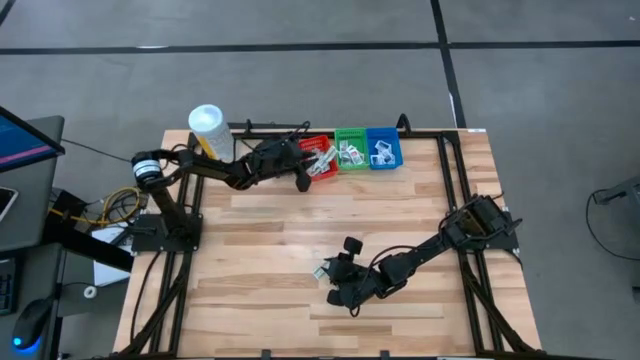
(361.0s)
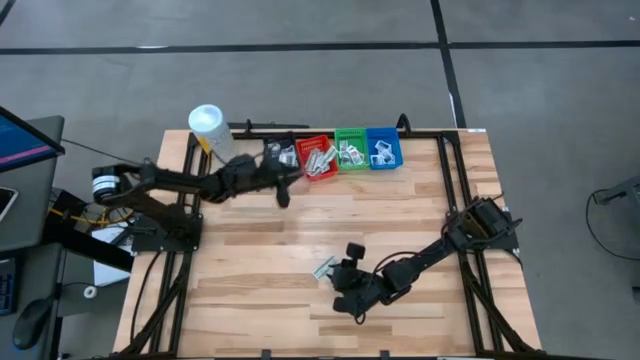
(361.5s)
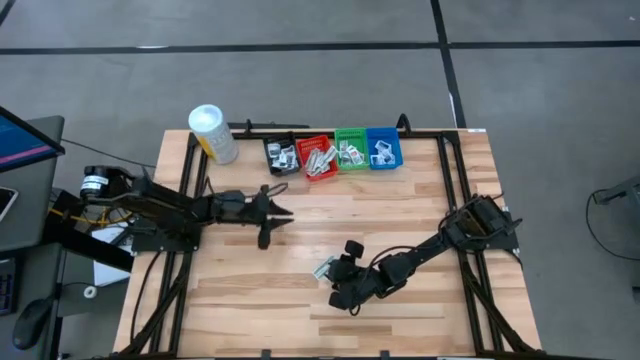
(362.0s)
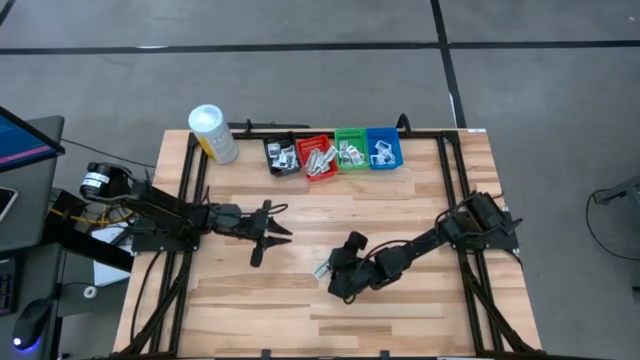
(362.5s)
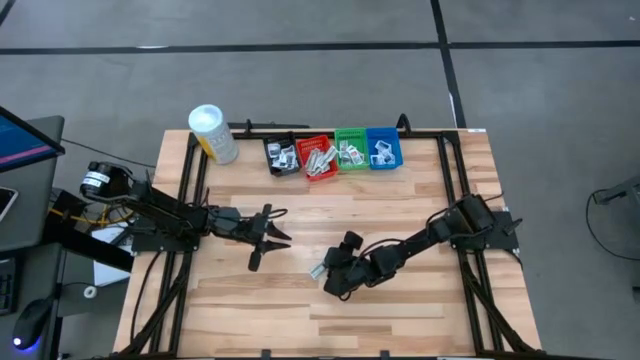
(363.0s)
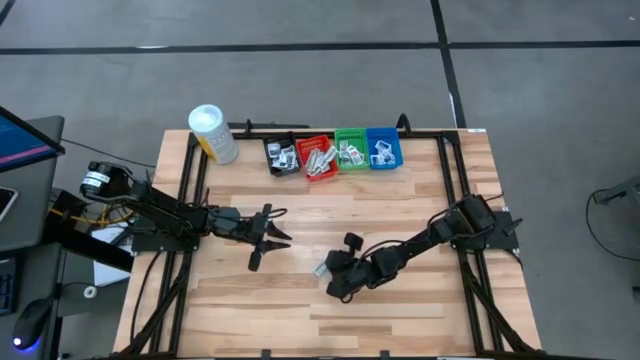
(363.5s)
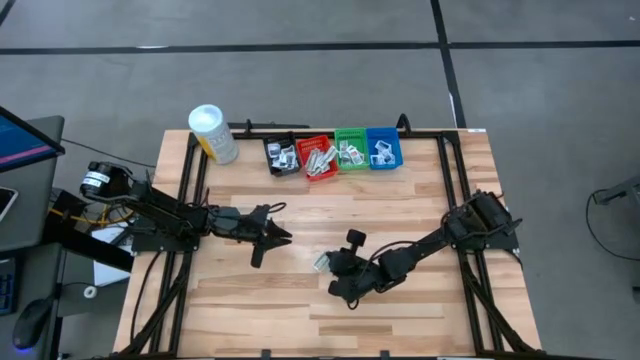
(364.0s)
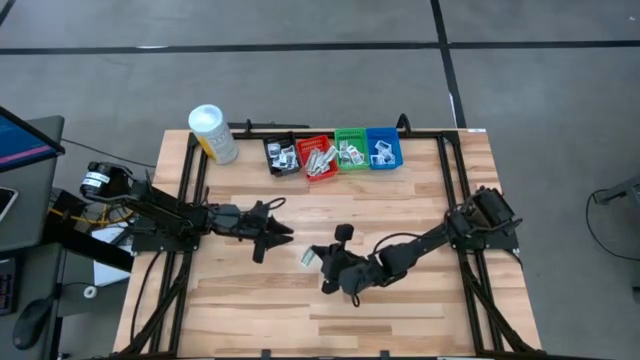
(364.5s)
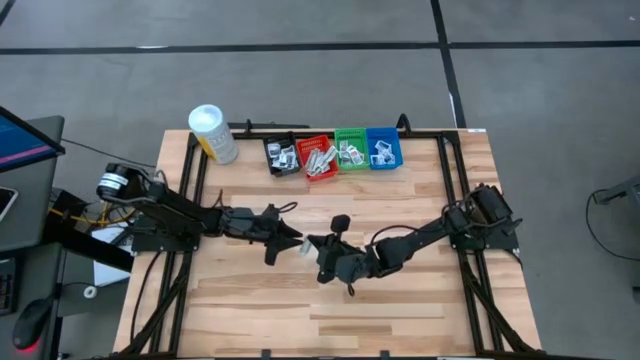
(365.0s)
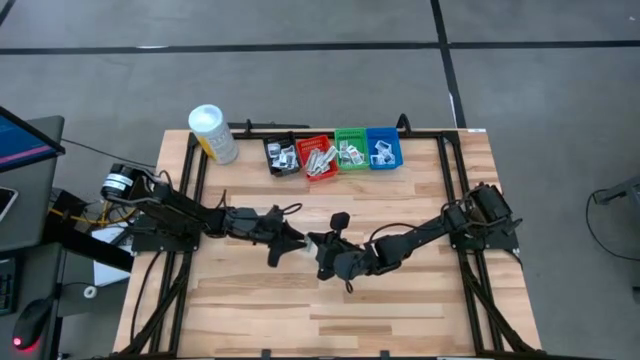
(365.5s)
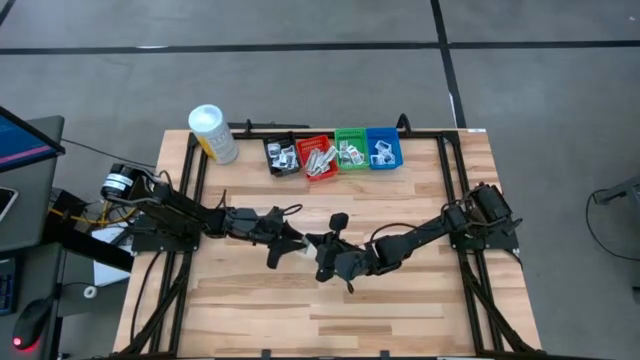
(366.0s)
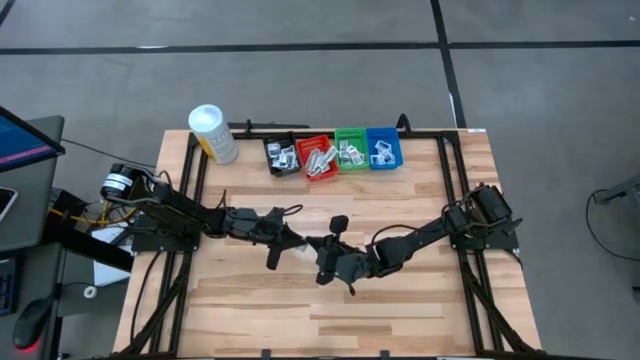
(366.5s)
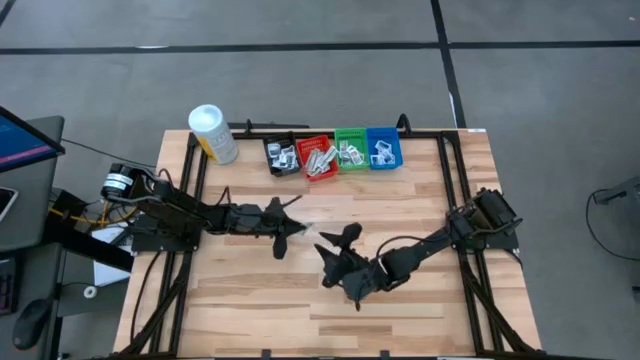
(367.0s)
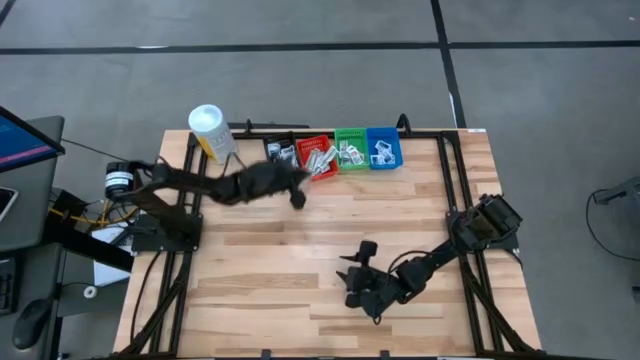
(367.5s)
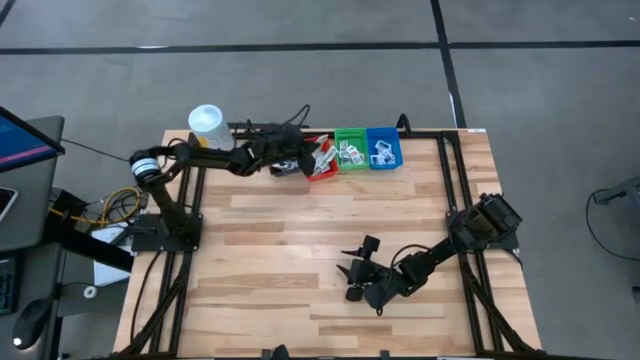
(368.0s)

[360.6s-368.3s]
Task: Pick & Place First Aid Supplies
Put the green bandage pack into the red bin

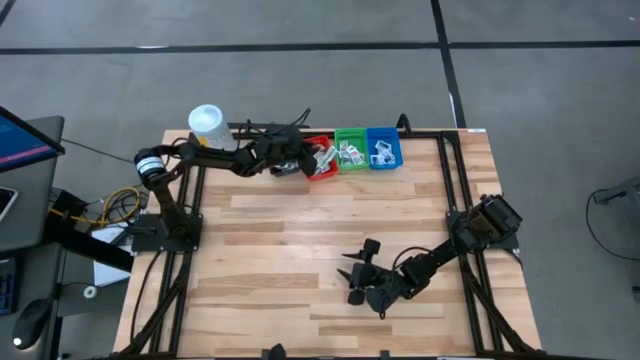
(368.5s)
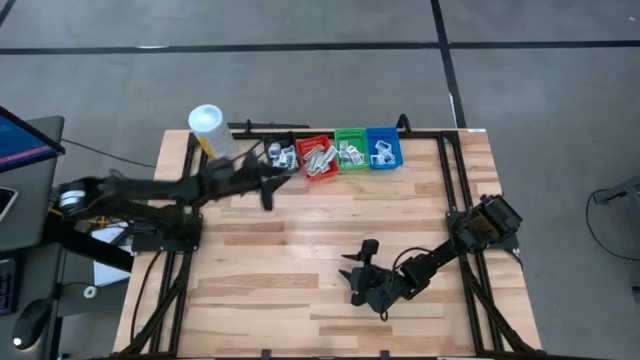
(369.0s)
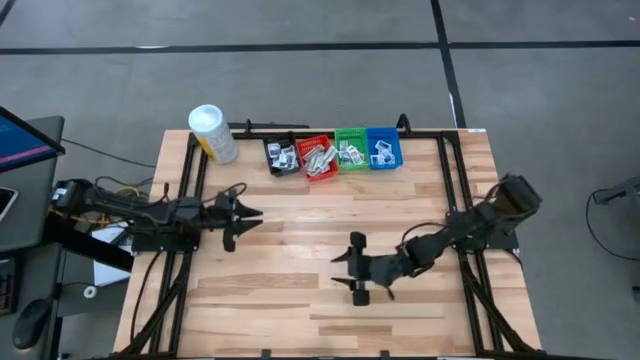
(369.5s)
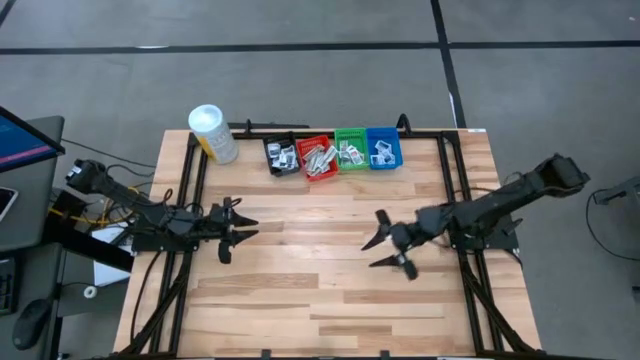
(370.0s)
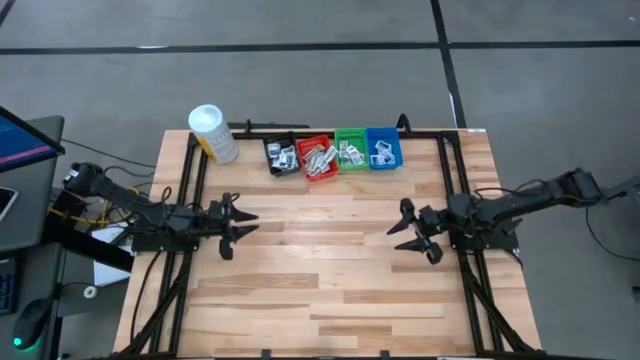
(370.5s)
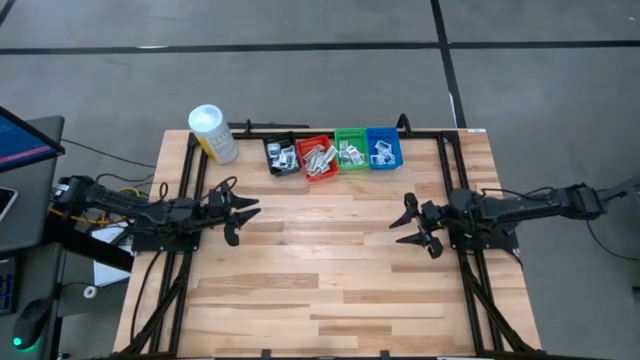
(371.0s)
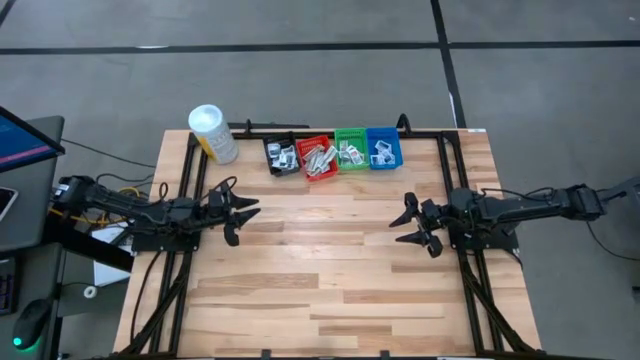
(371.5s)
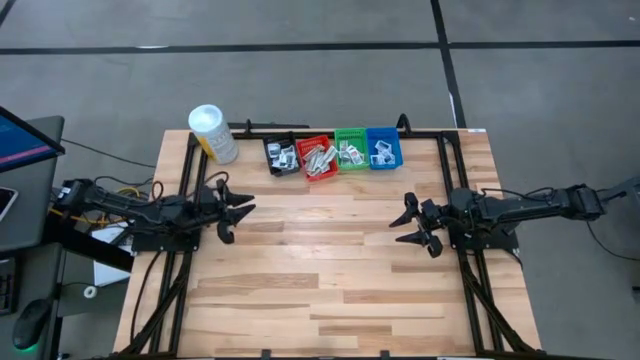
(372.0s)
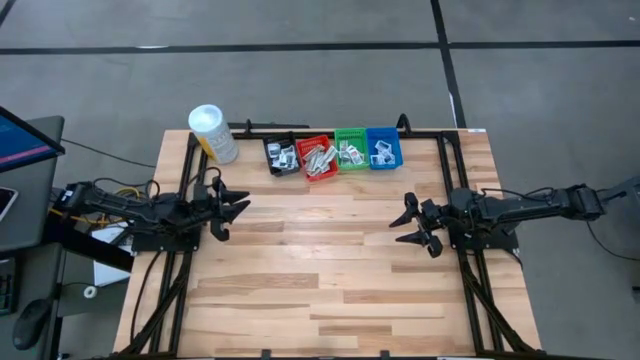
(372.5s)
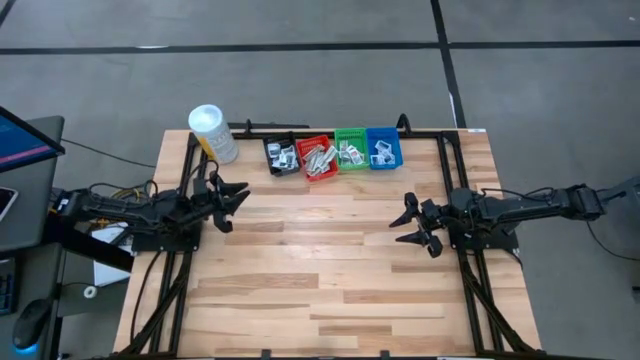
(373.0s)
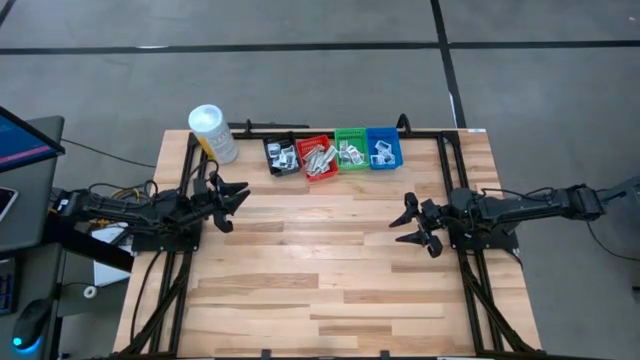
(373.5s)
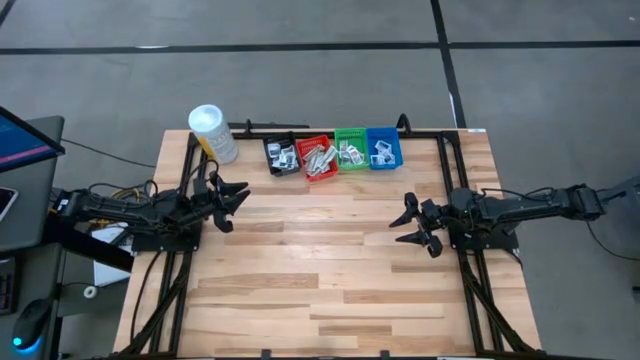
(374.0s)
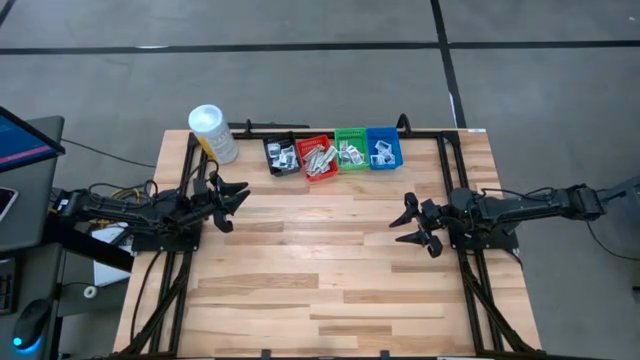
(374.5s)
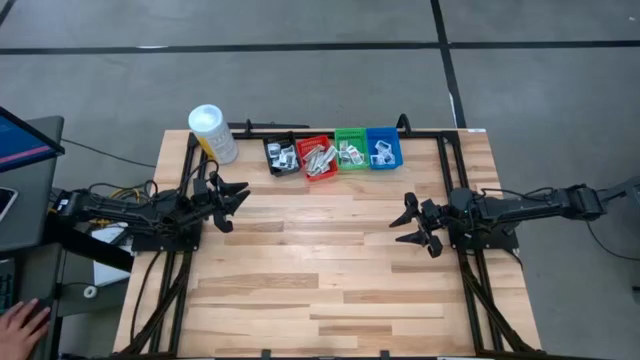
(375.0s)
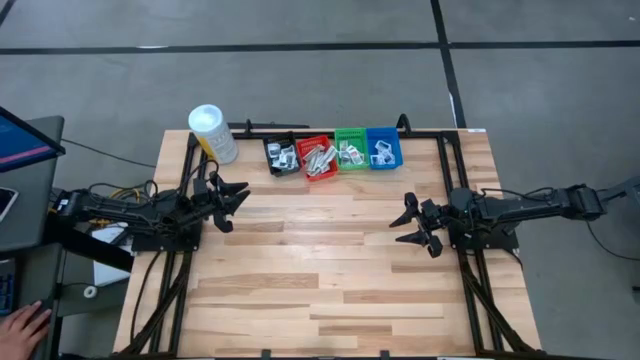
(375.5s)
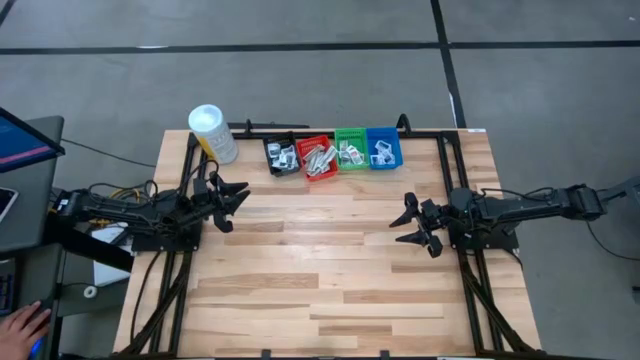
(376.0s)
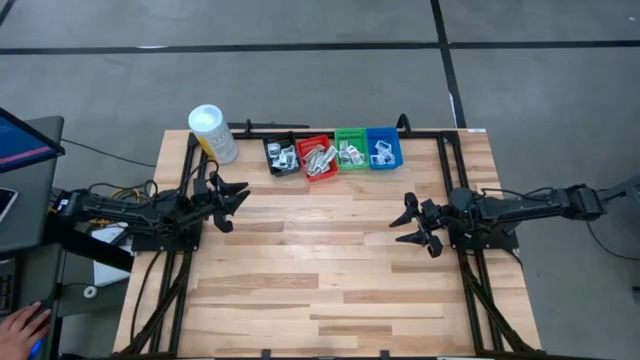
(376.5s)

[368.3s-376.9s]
Return to Home Position

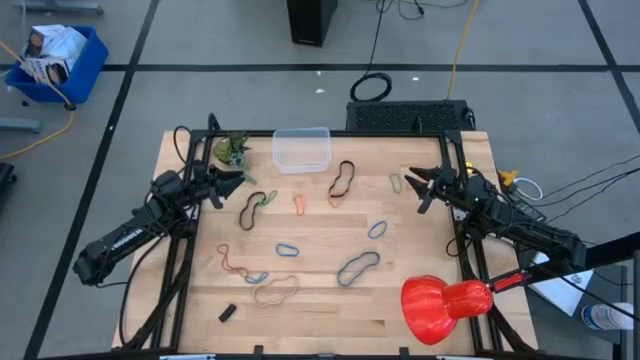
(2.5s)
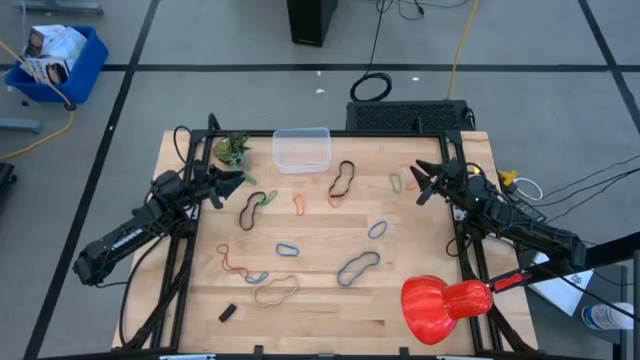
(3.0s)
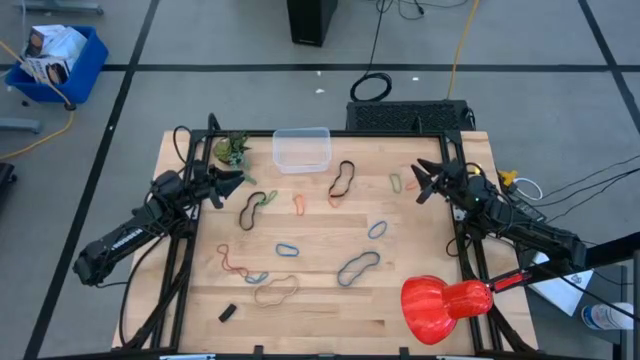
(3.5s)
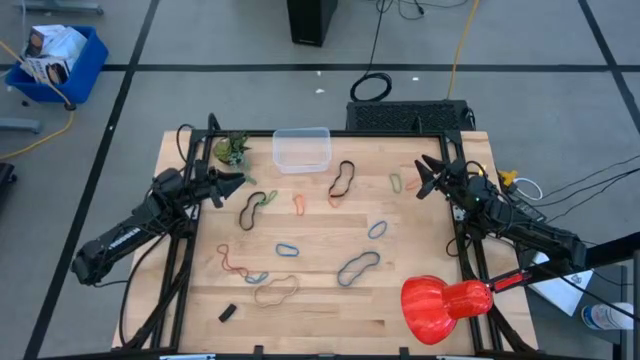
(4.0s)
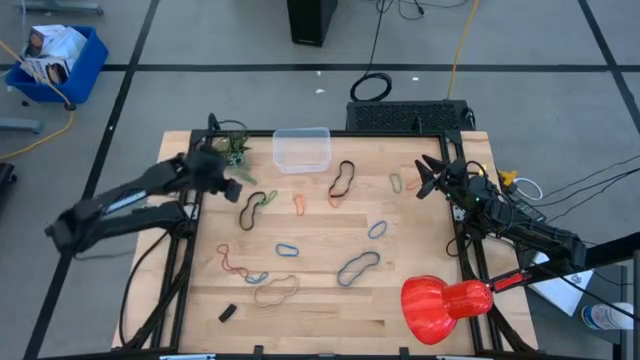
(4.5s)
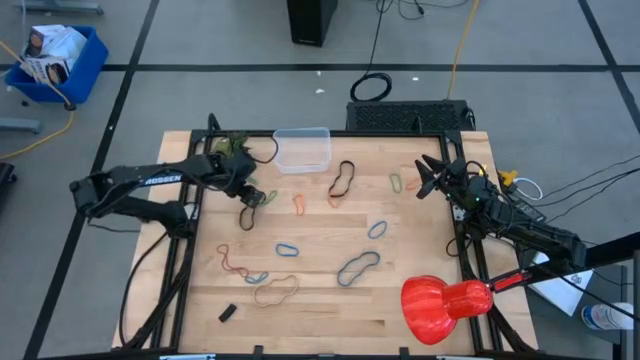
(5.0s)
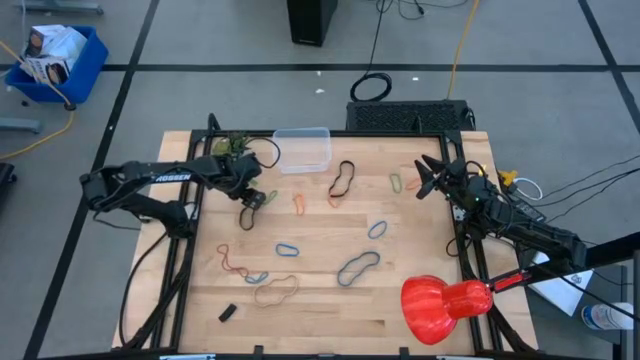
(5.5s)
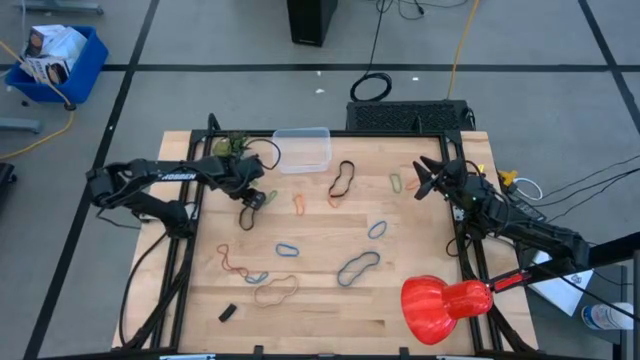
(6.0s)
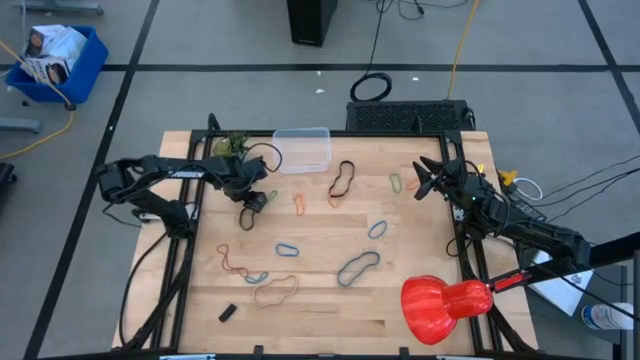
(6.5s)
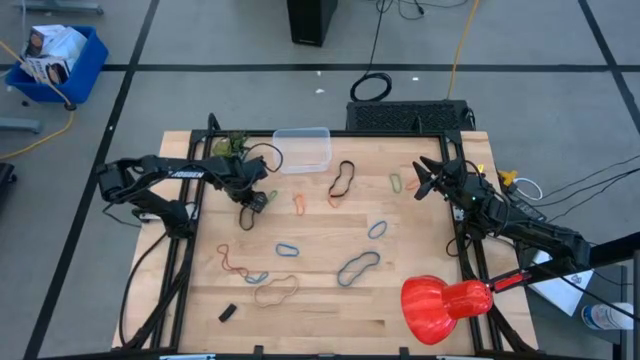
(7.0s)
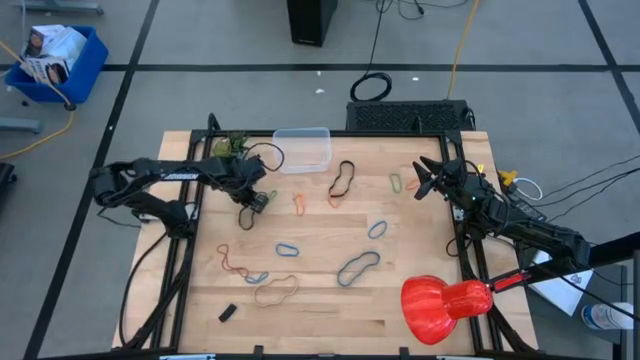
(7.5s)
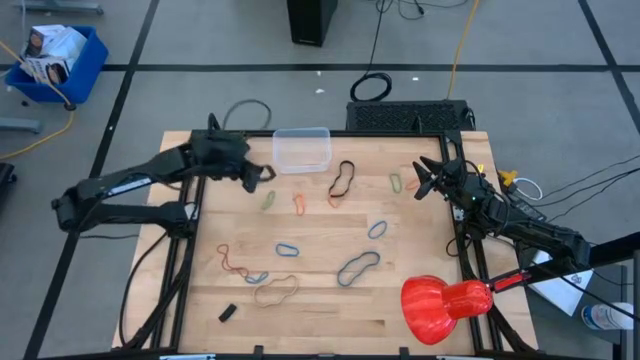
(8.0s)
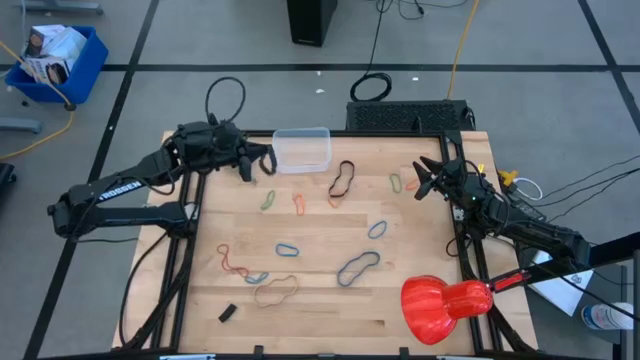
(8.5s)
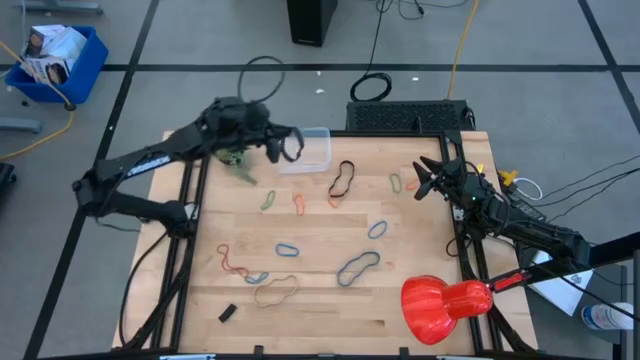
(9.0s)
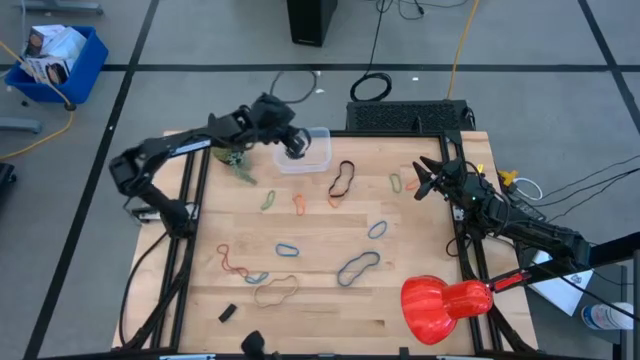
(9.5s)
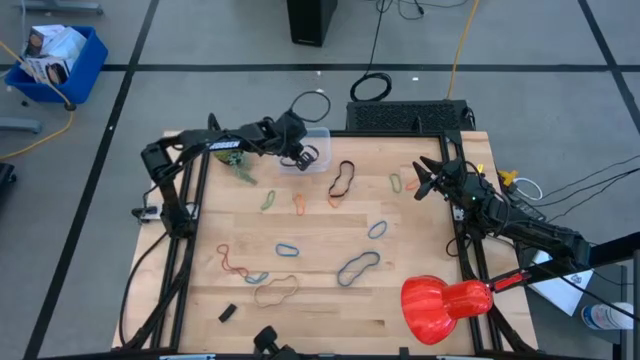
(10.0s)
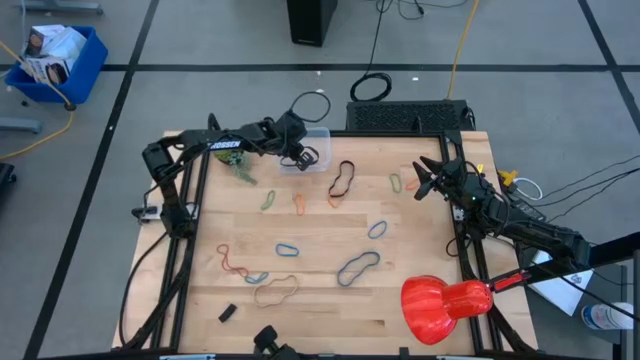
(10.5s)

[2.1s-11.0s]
Task: Pick and place rubber bands into bin
Put the left black rubber band into the transparent bin
